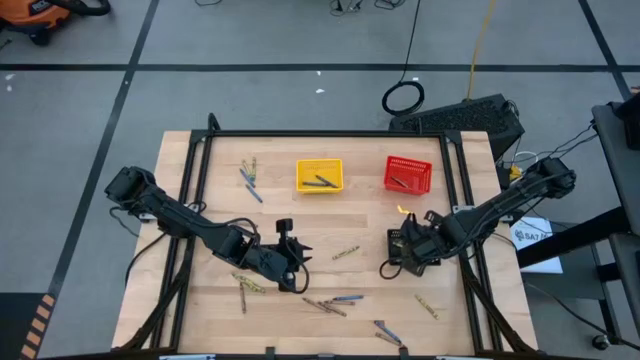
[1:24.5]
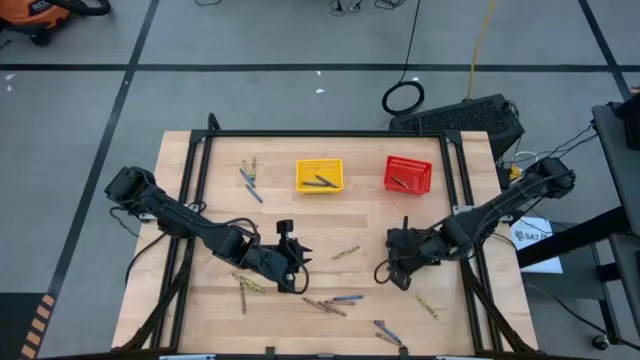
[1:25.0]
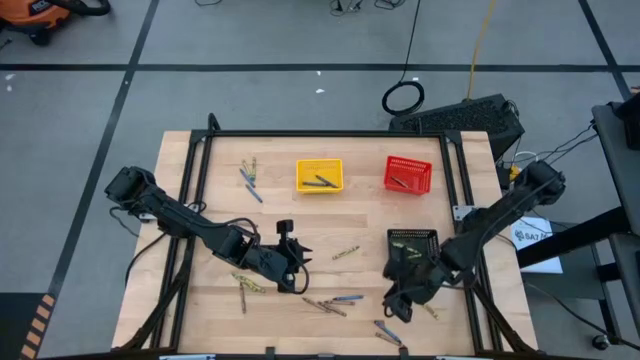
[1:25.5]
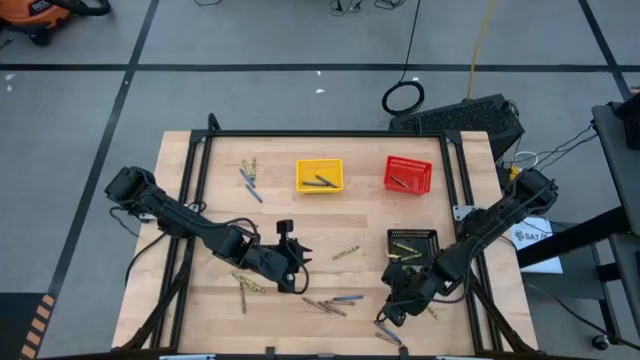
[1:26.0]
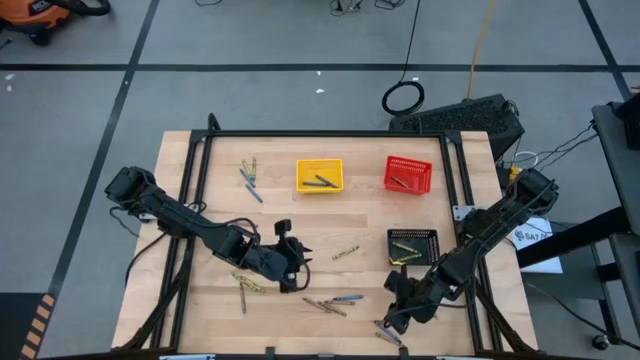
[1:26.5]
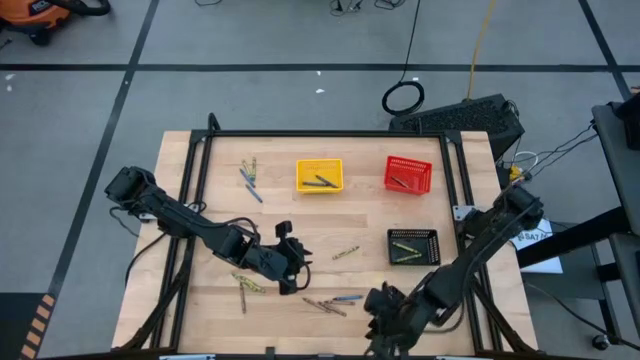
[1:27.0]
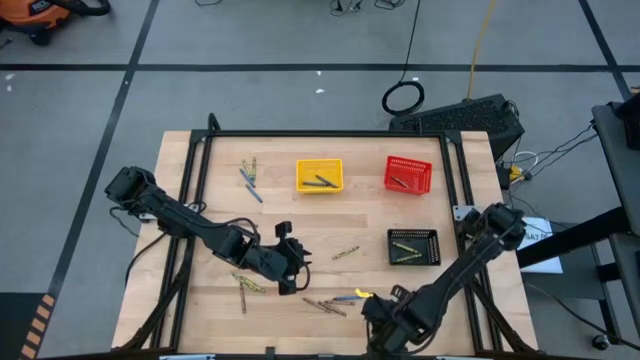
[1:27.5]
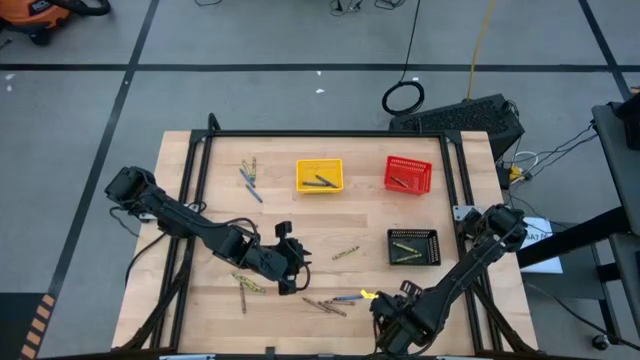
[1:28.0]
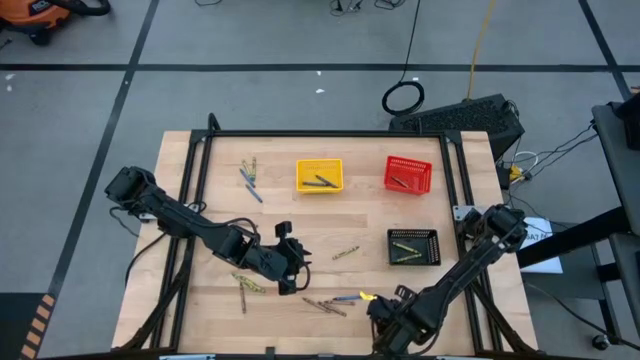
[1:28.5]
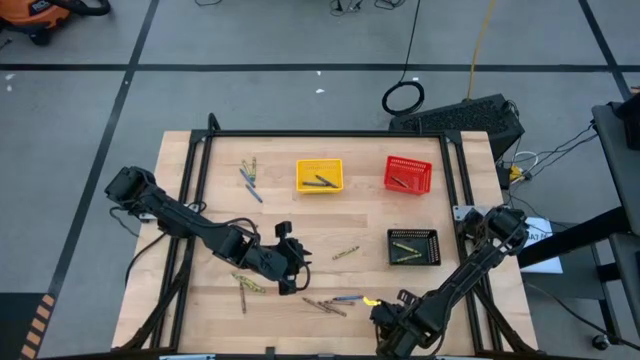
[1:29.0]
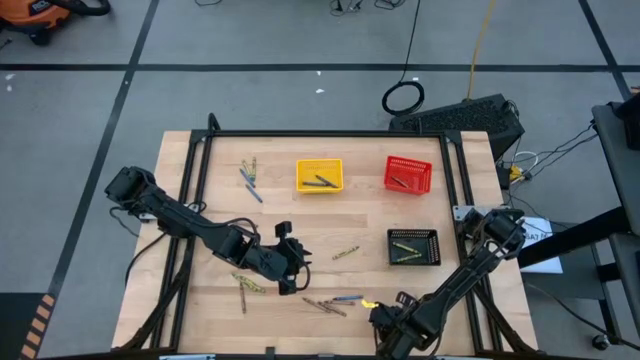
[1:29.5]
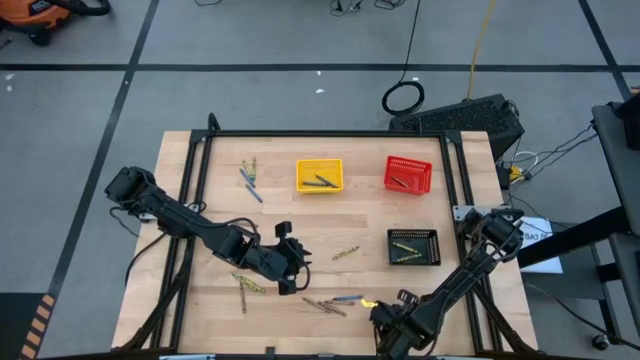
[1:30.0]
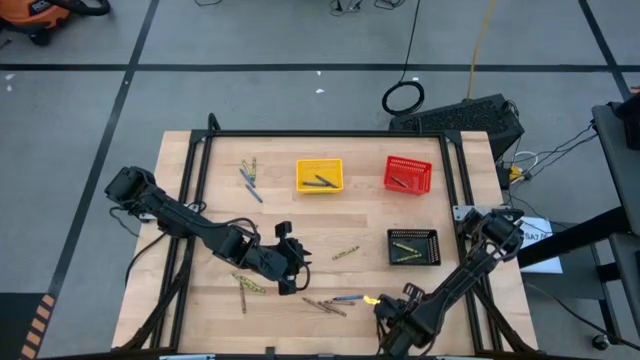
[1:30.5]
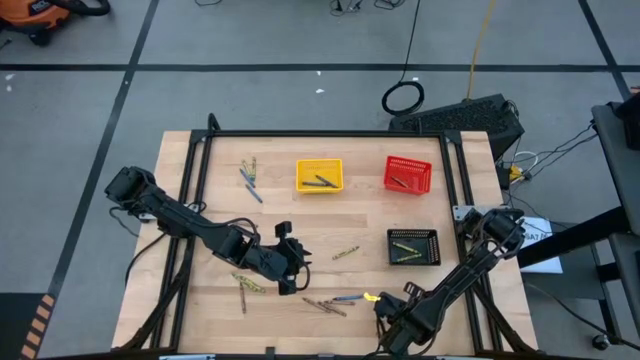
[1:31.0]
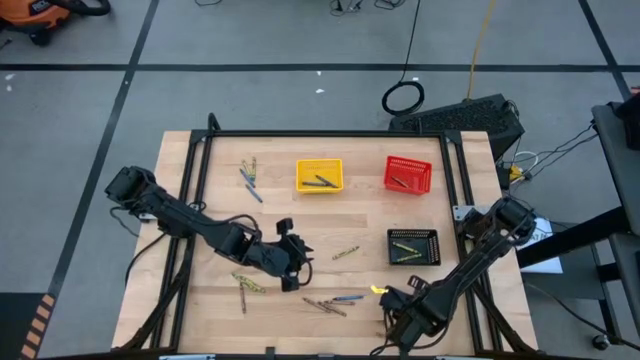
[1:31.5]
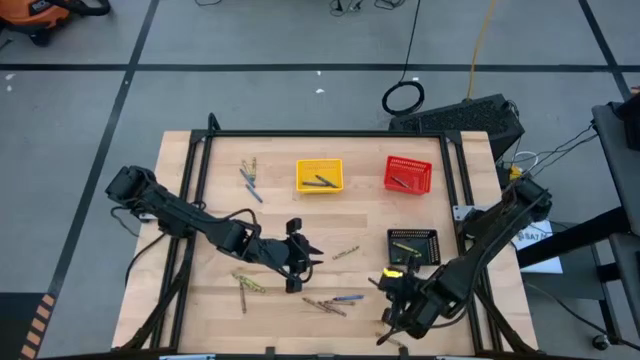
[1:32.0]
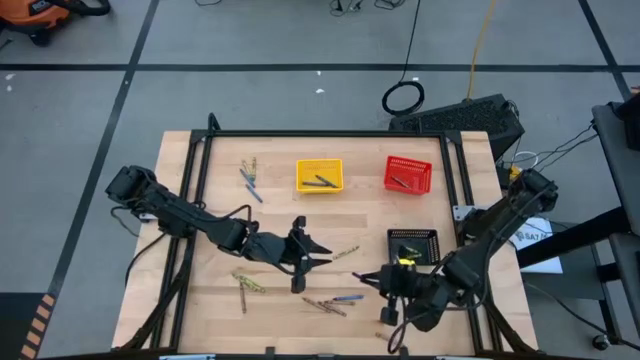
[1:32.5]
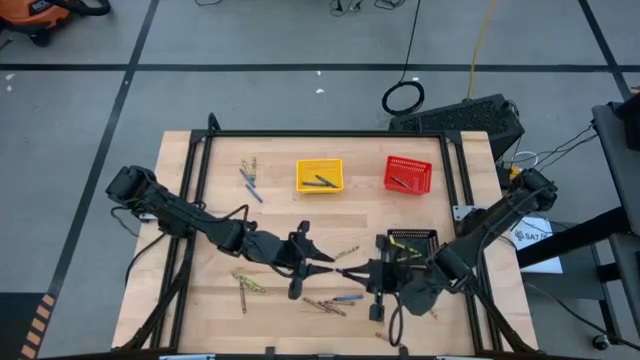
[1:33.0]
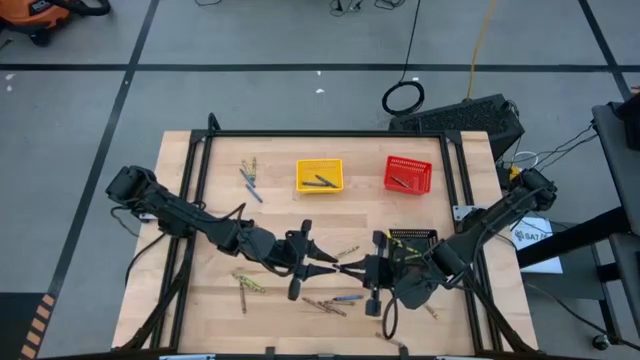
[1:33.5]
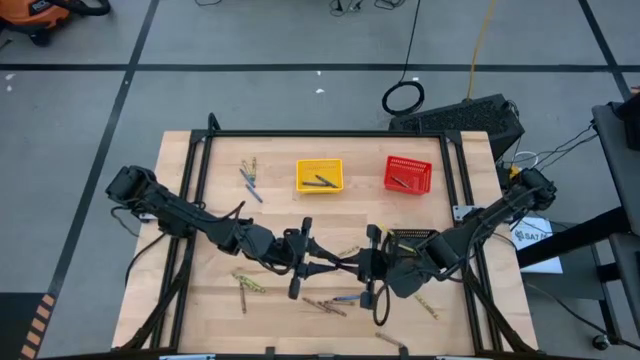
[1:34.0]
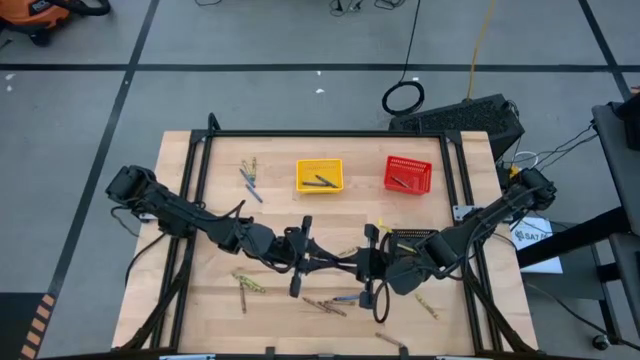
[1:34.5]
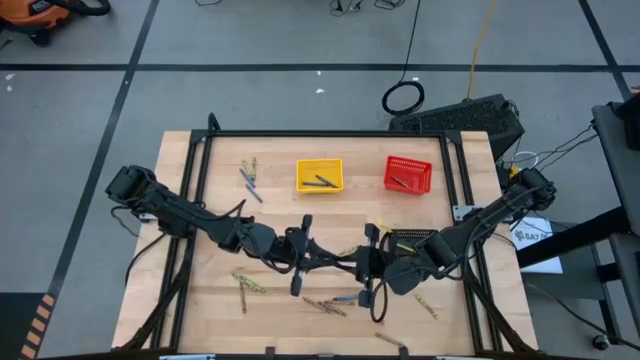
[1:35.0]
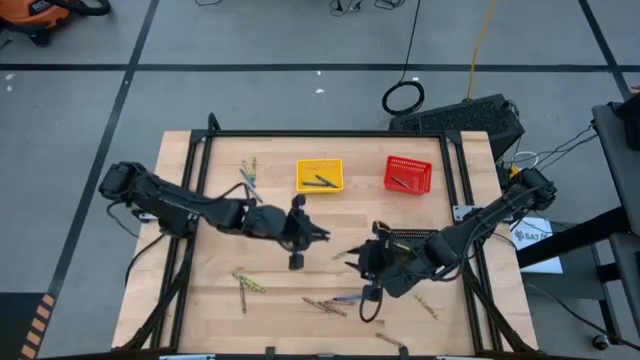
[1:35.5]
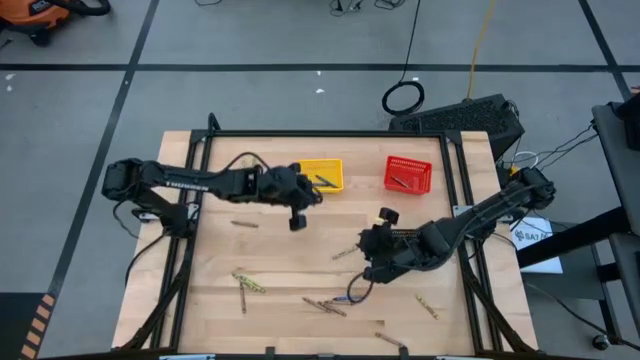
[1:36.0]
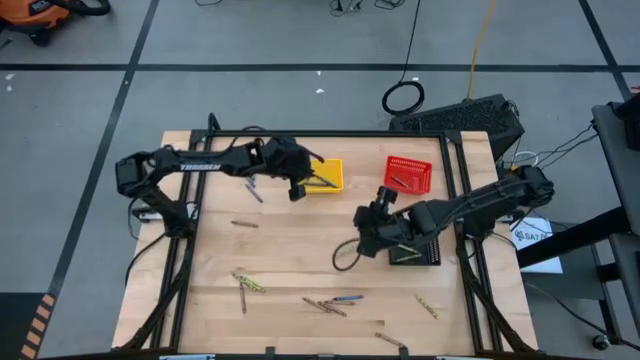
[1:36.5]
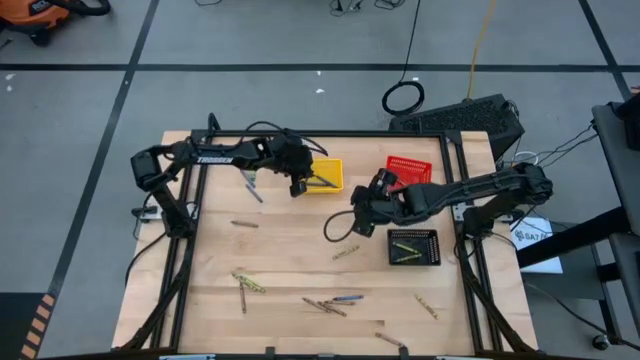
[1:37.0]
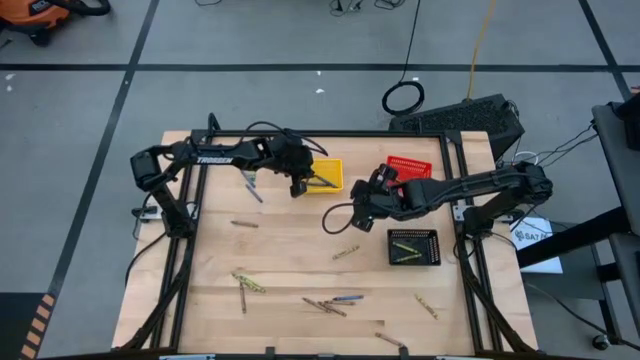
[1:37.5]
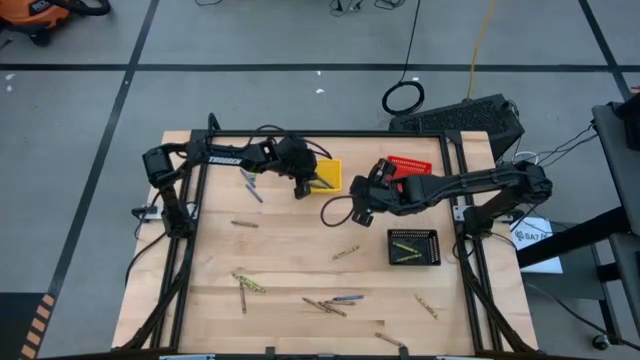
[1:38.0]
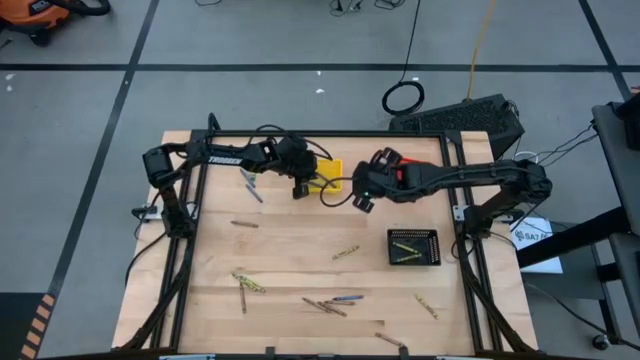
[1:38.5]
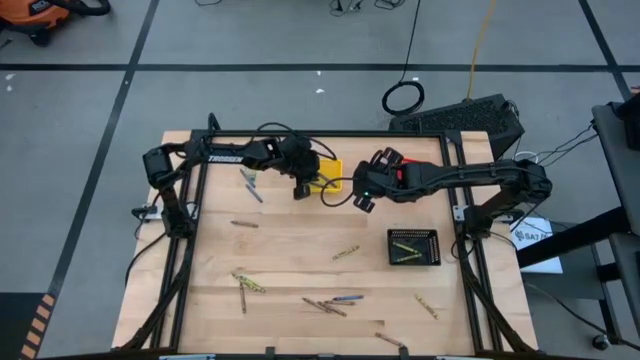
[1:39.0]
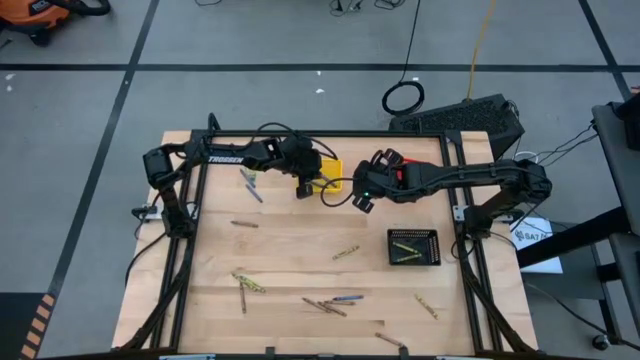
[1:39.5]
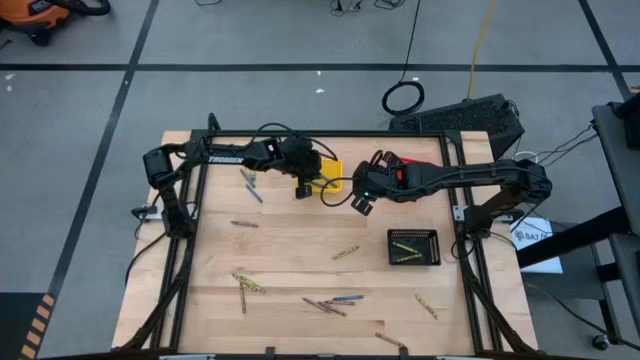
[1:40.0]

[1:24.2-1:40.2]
Task: Sort crayons
Put the blue crayon into the yellow bin

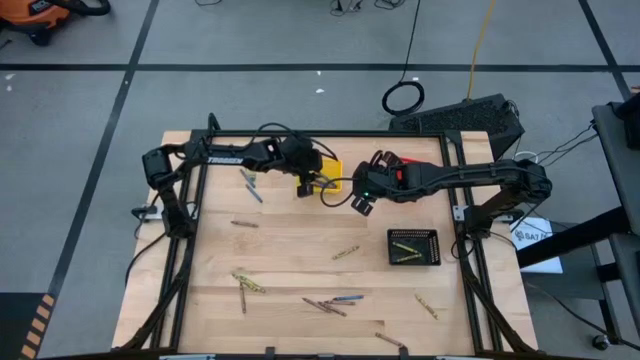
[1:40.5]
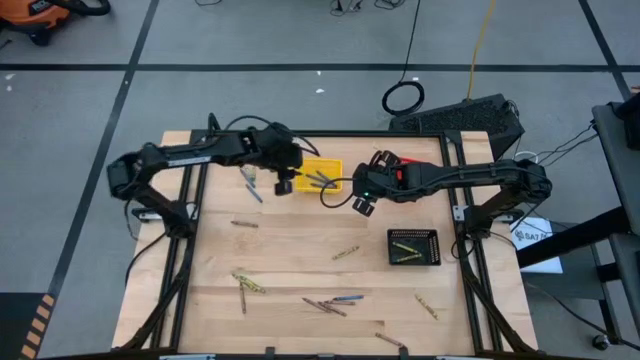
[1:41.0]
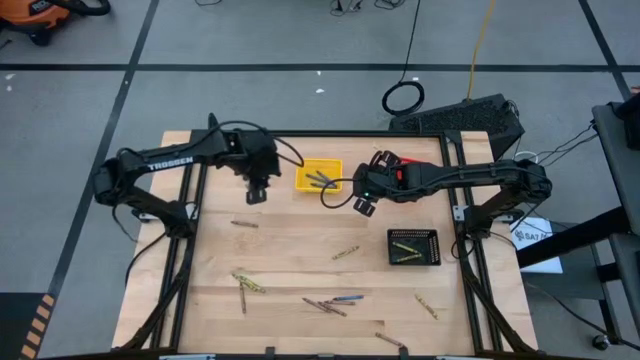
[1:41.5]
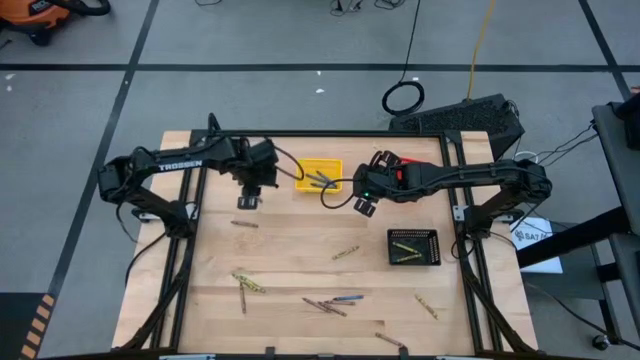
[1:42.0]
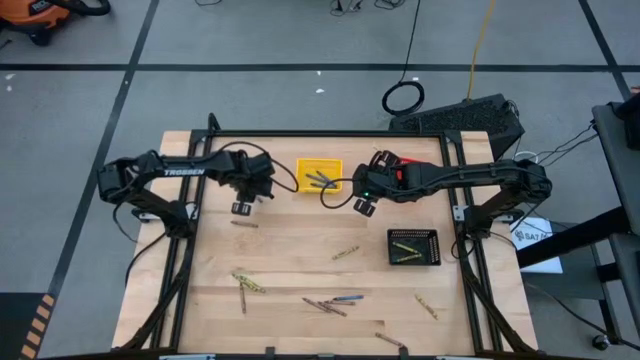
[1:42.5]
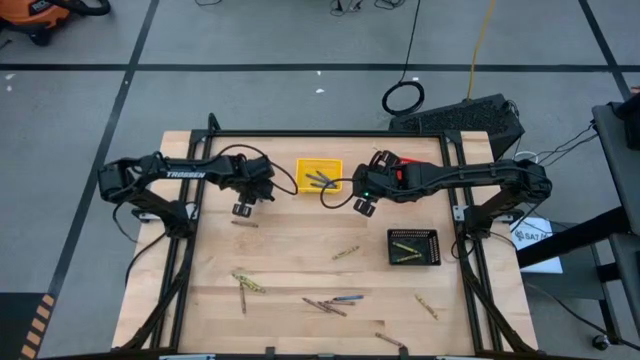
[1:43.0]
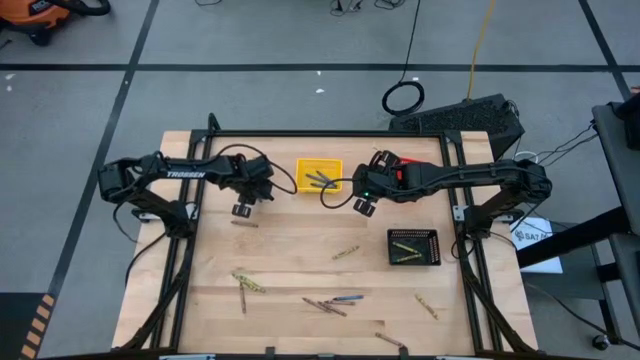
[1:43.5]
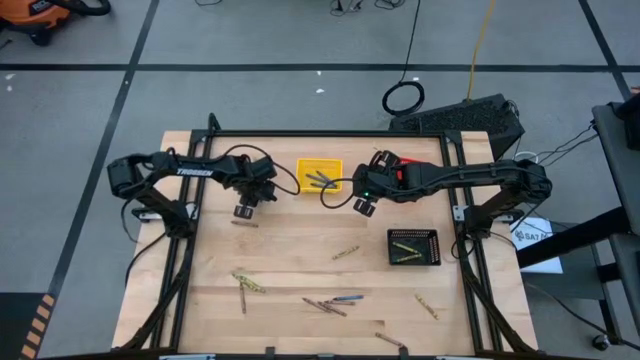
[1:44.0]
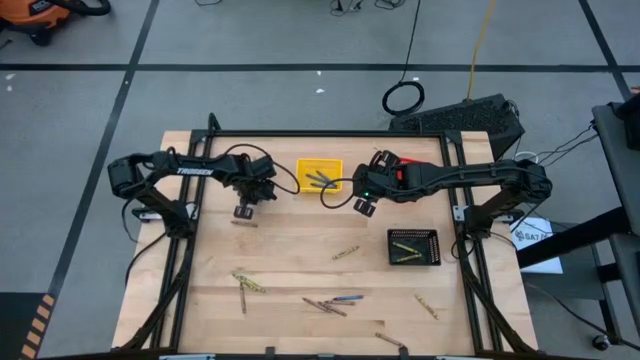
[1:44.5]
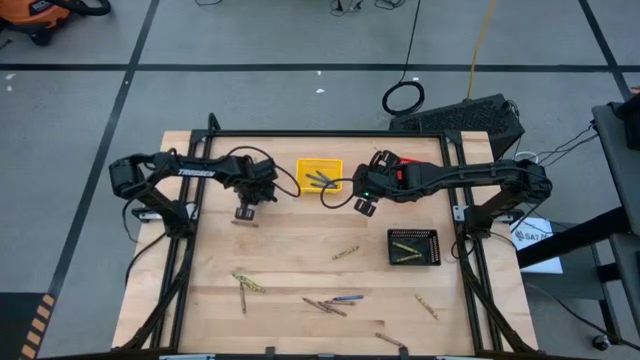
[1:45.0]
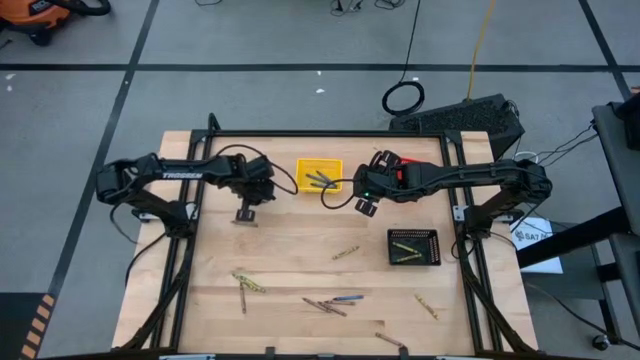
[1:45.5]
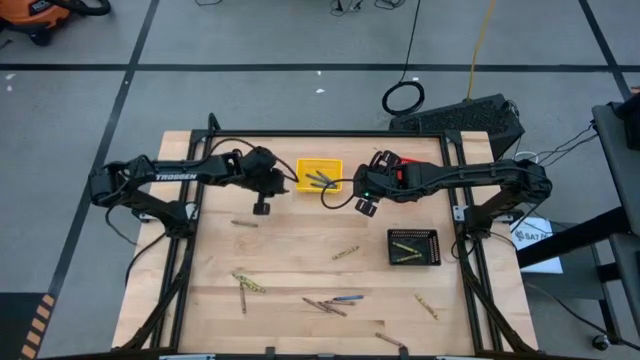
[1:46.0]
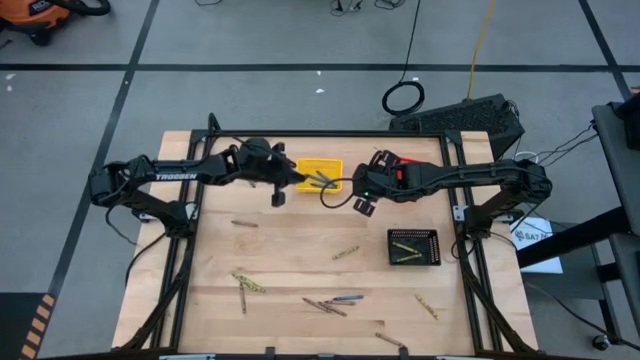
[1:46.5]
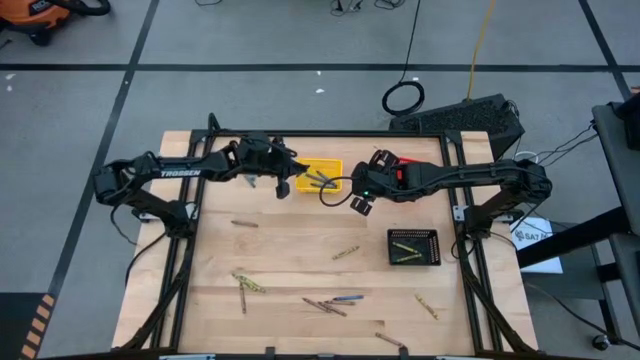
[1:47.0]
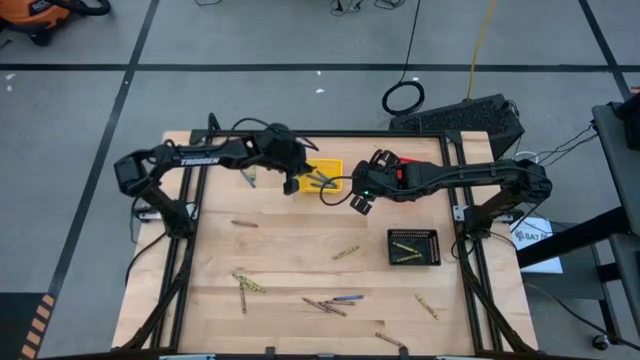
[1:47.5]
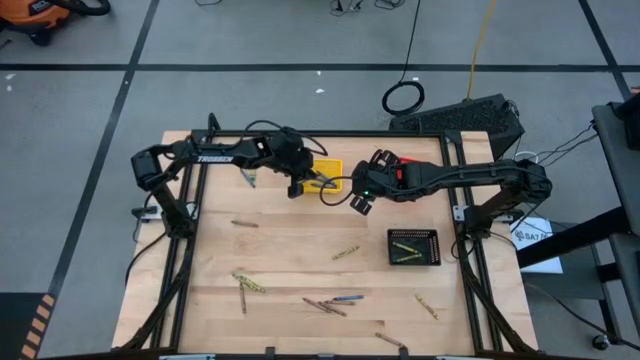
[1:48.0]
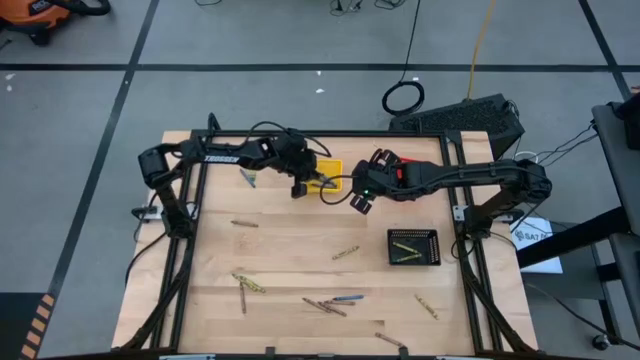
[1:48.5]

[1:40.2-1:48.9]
Put the blue crayon into the yellow bin
